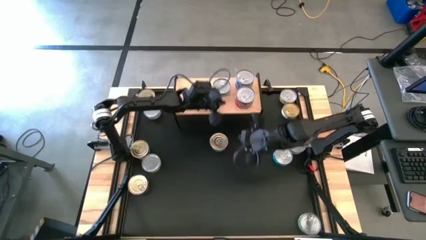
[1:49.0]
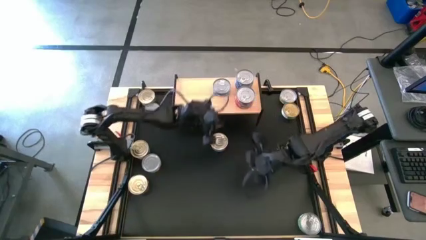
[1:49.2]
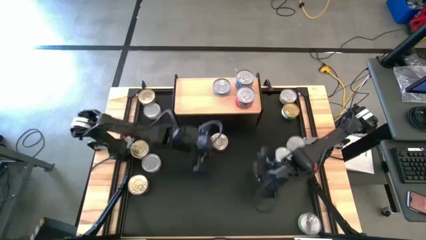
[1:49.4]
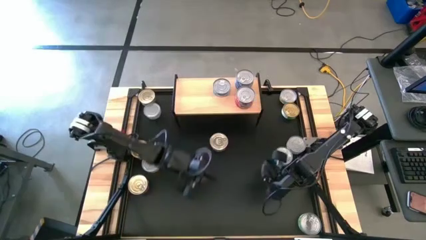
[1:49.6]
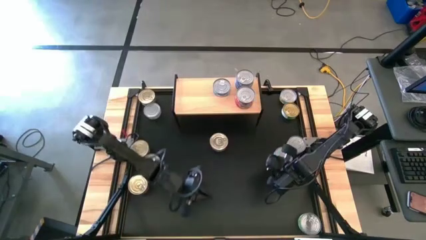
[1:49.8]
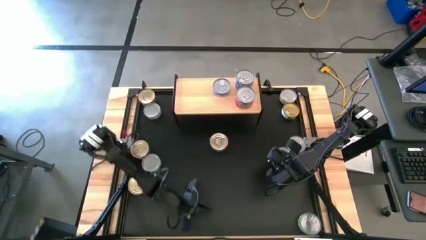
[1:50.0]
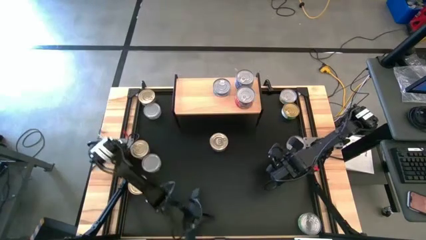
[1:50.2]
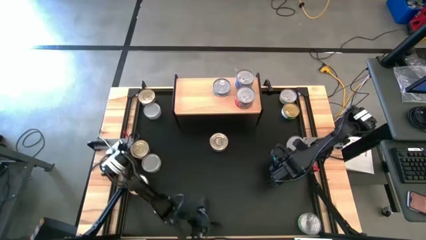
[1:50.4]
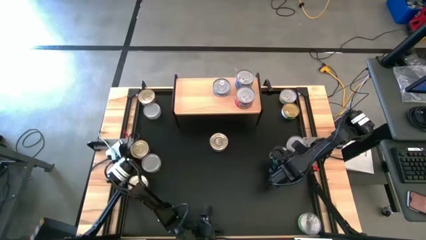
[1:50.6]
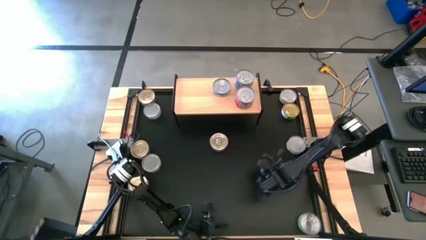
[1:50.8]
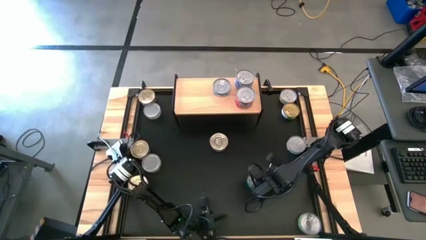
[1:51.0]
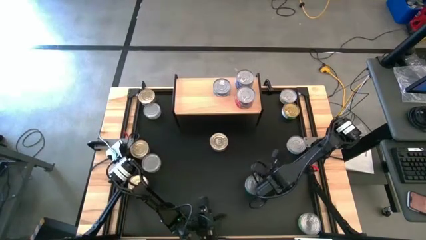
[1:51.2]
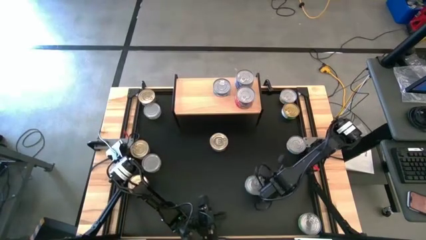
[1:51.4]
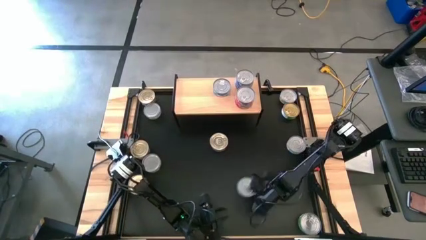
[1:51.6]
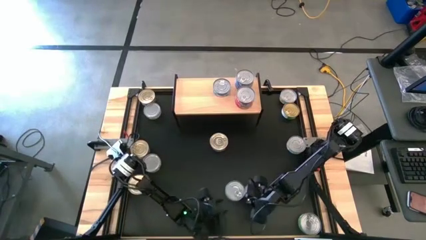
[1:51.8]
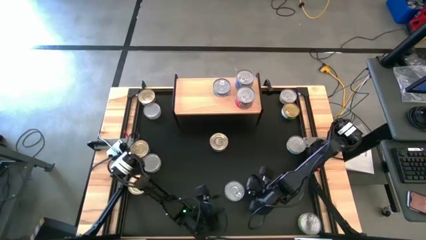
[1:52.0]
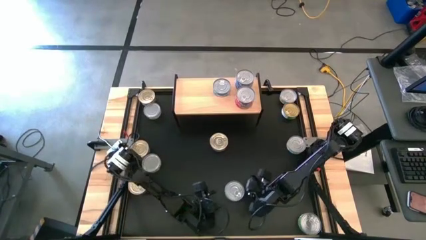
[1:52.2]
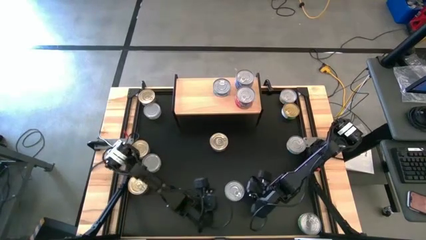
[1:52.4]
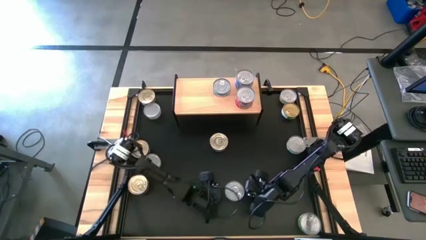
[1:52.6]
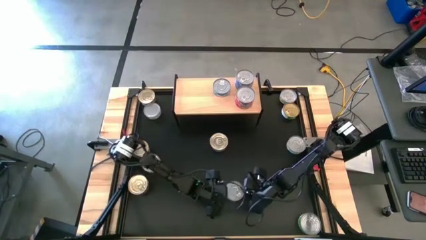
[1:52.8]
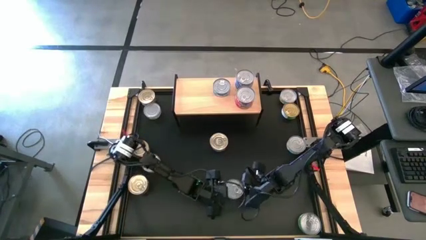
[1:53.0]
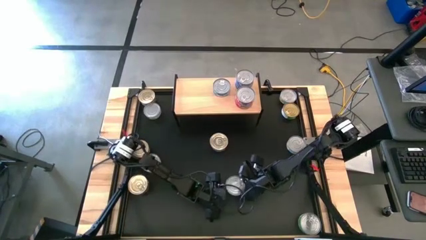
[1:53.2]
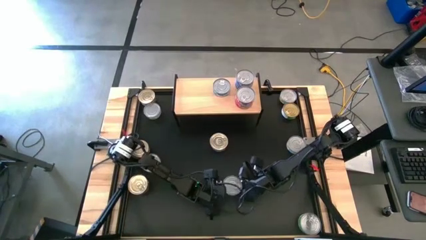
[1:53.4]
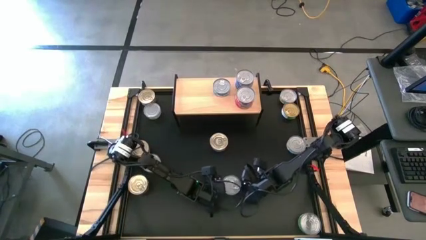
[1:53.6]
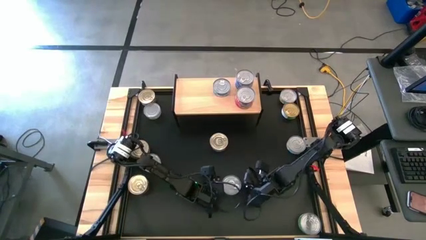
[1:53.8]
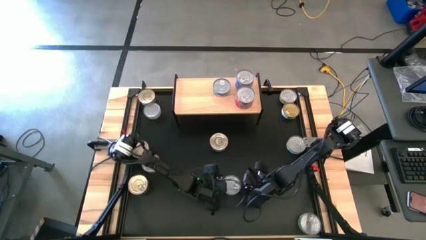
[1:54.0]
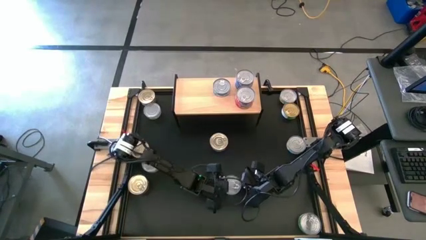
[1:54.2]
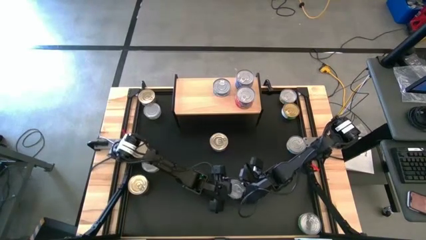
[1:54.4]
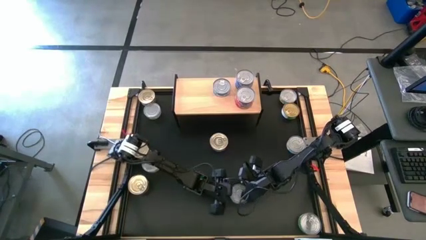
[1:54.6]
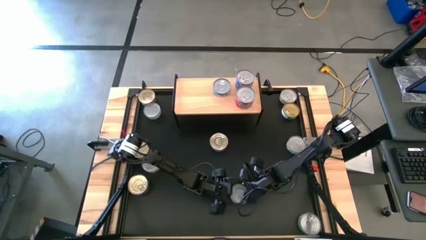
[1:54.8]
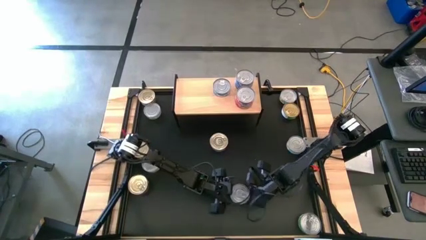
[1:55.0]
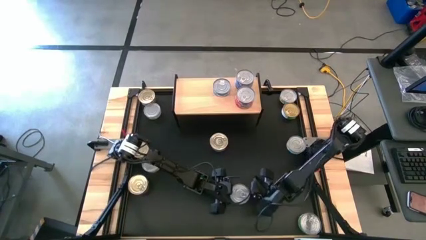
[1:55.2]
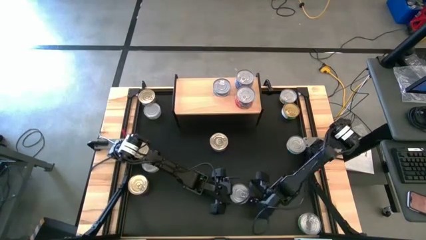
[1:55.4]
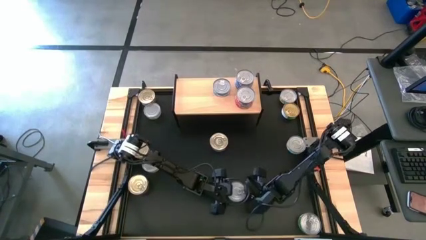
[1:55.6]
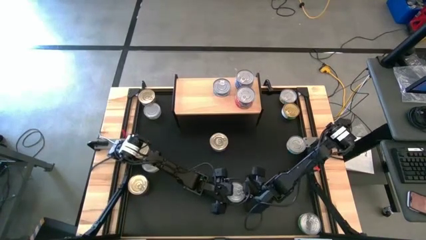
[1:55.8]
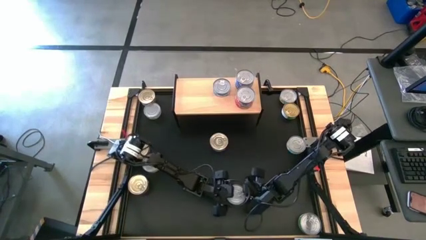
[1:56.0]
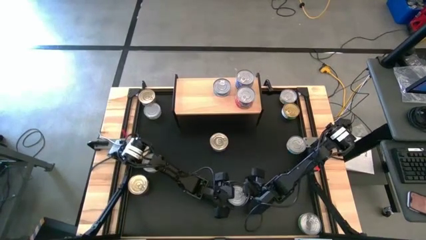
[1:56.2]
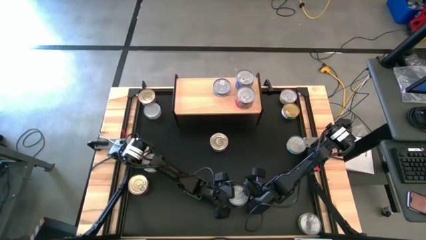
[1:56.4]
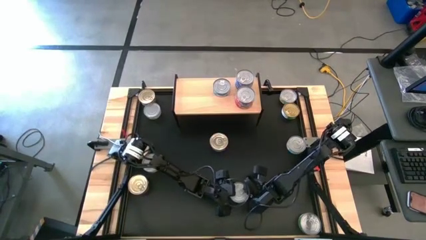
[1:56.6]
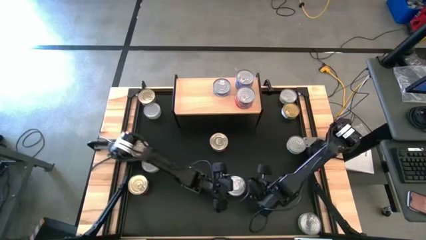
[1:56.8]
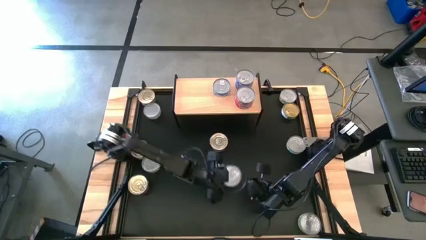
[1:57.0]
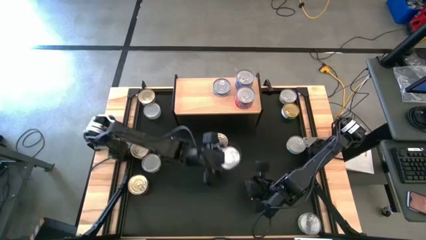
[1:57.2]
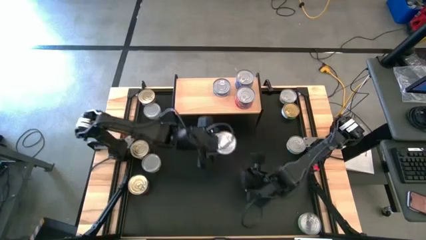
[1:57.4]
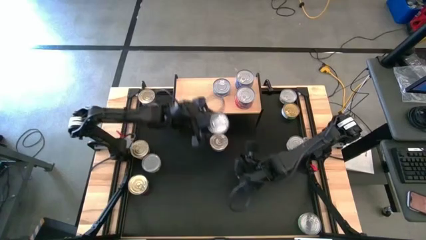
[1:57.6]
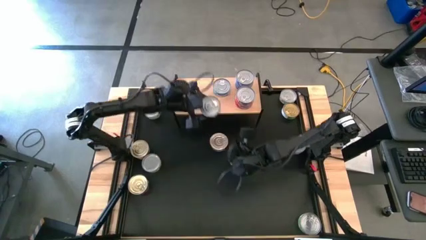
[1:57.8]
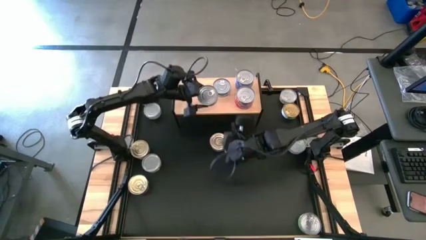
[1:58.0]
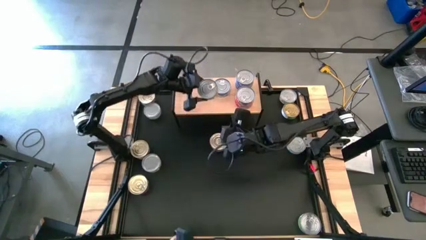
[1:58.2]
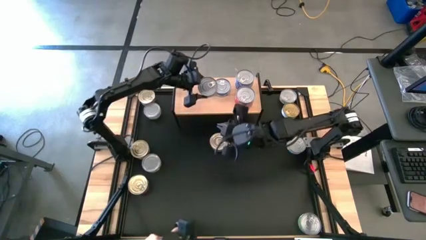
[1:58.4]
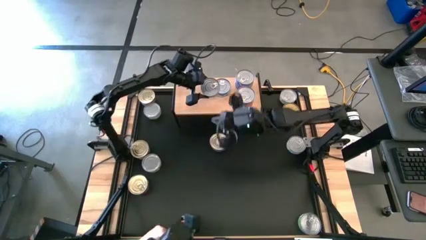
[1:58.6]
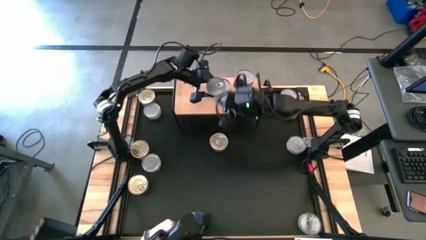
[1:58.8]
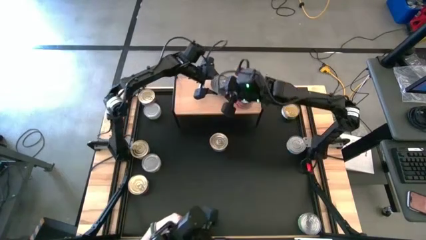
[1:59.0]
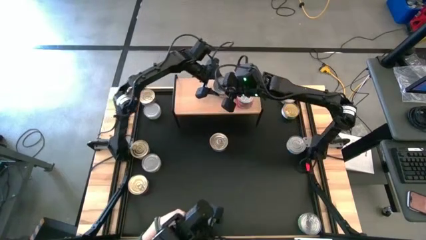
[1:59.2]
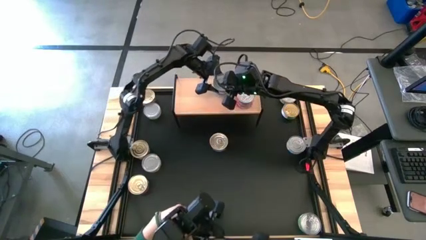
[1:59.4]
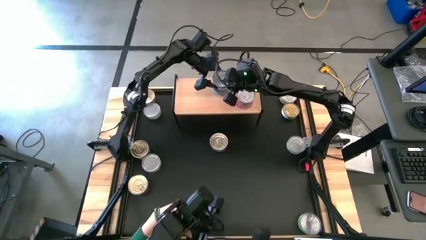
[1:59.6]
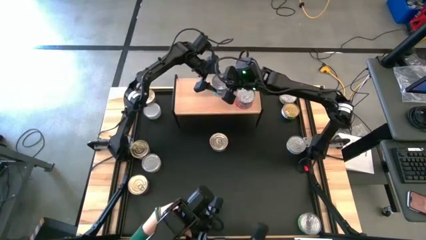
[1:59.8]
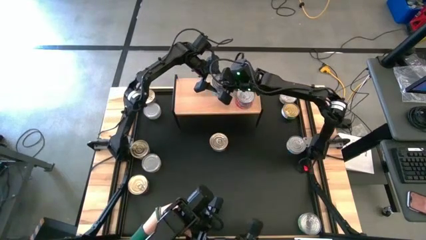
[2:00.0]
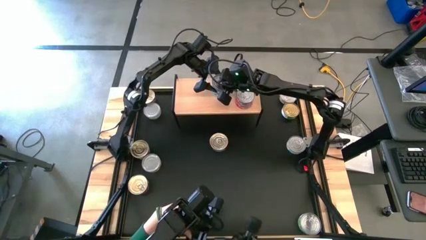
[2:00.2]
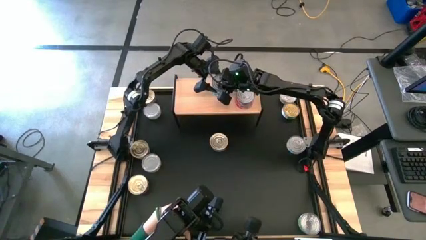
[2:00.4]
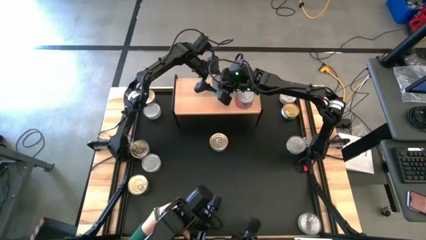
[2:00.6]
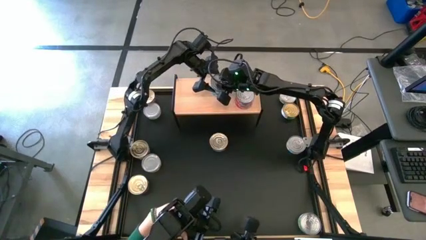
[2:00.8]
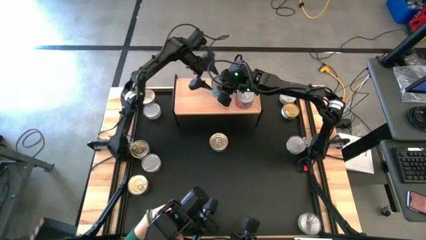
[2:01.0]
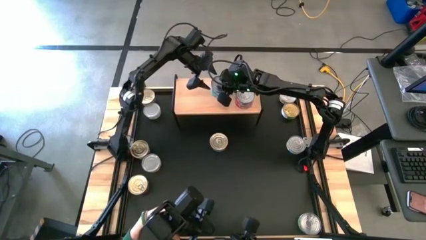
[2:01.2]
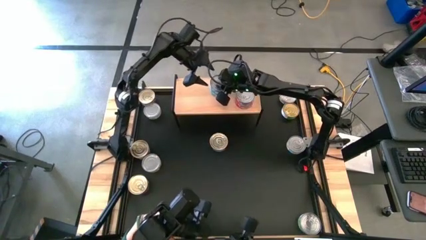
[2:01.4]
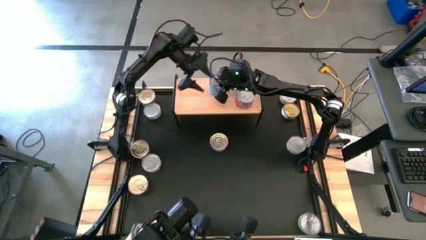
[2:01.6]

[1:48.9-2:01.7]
Task: Stack canned seafood by type on shelf
Stack the green blue tuna can on top of the other green blue tuna can on the shelf

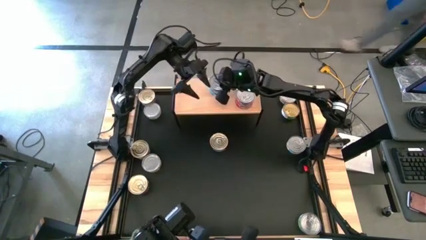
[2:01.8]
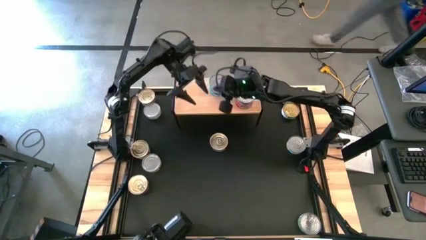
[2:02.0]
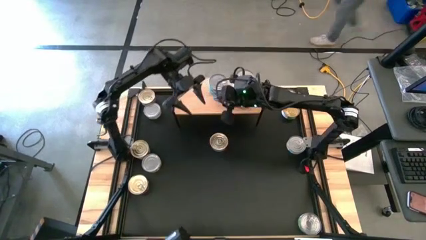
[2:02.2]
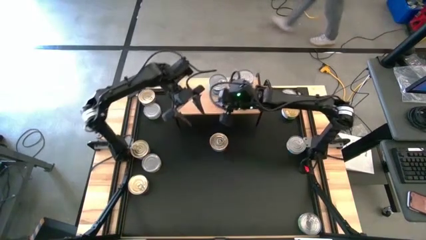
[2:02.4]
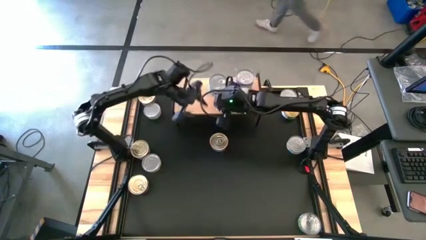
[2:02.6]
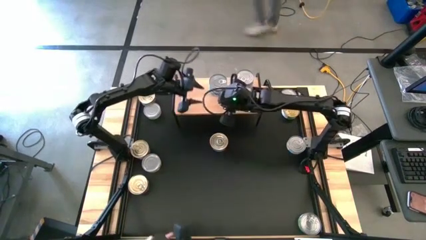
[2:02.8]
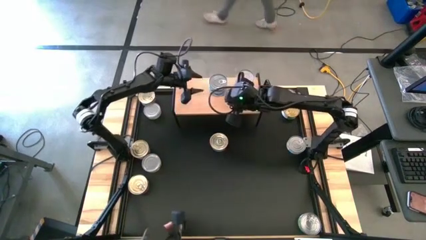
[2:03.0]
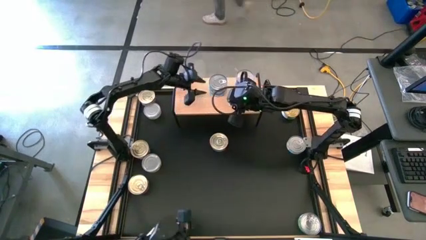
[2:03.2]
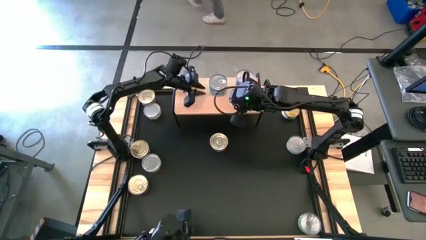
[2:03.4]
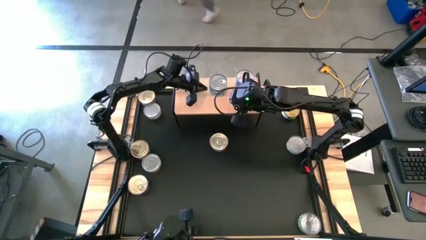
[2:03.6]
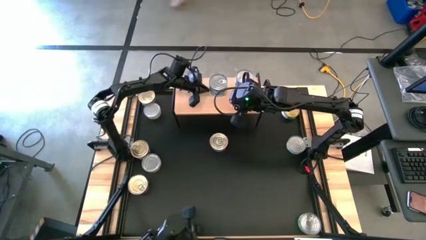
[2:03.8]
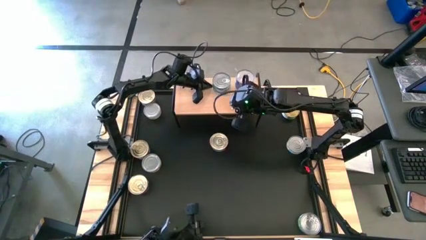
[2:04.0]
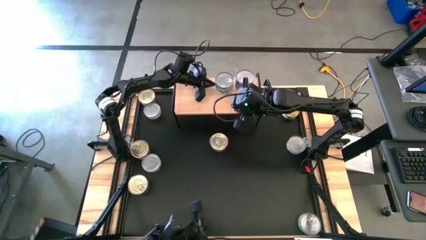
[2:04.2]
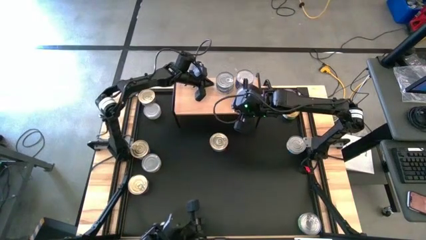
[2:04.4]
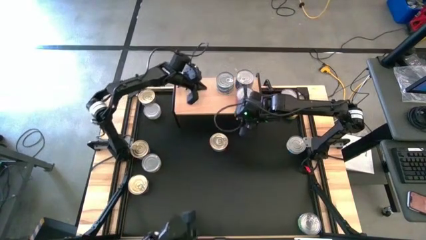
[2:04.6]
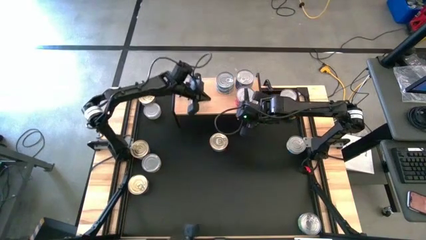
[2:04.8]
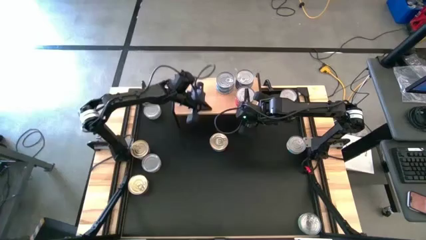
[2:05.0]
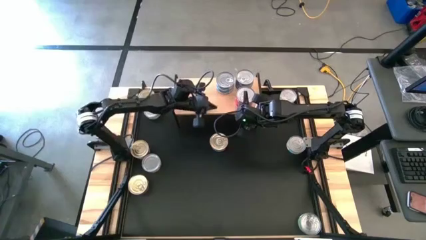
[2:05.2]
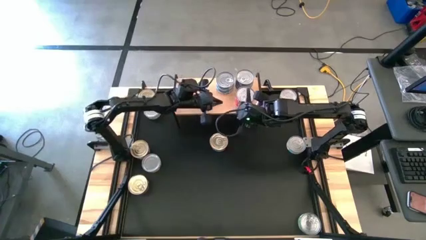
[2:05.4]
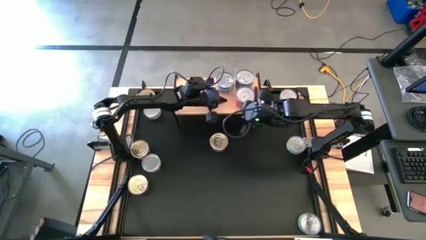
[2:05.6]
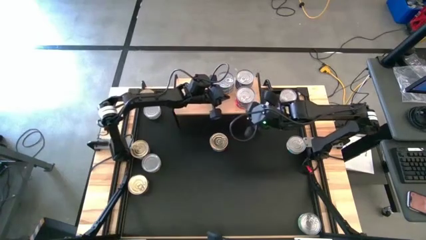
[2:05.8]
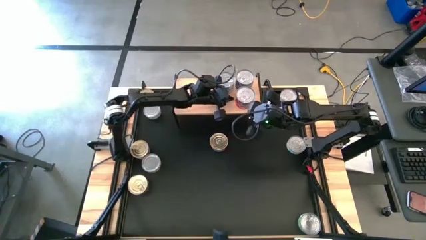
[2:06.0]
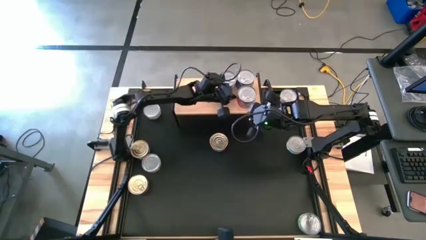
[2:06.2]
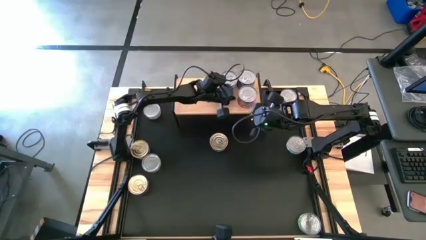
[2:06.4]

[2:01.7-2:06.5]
Adjust the tuna cans on the shelf
